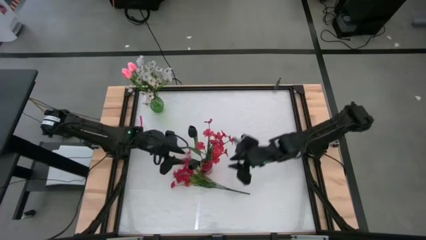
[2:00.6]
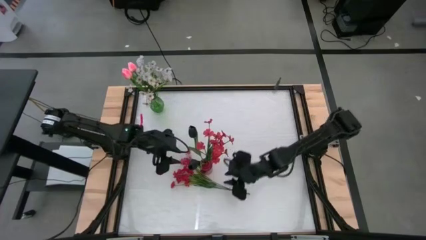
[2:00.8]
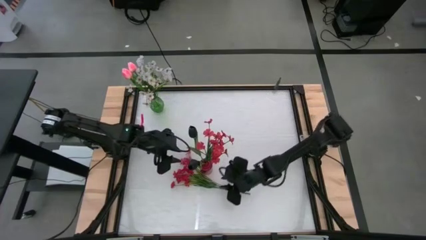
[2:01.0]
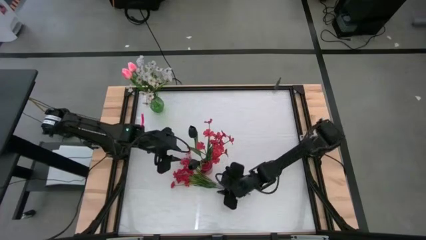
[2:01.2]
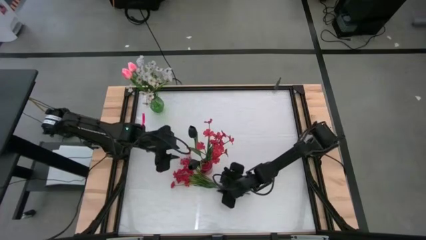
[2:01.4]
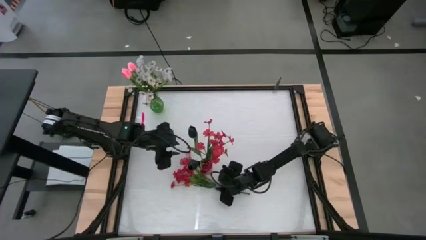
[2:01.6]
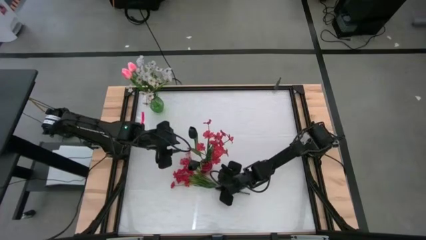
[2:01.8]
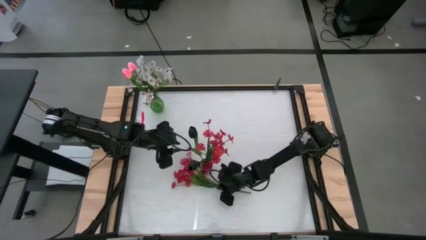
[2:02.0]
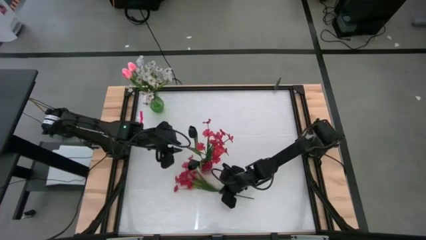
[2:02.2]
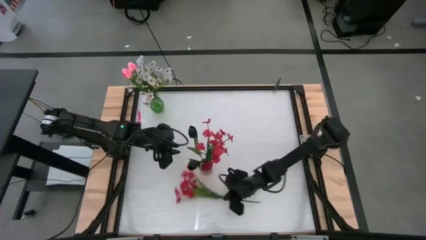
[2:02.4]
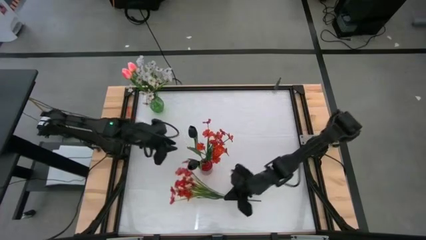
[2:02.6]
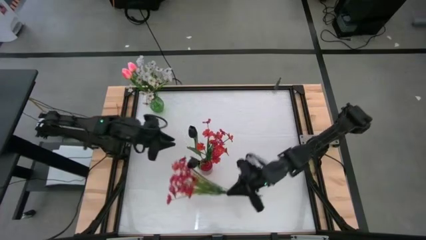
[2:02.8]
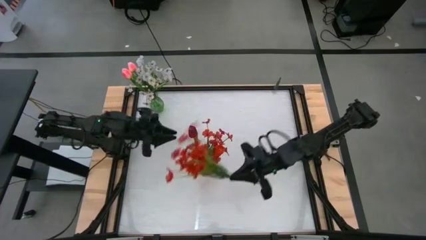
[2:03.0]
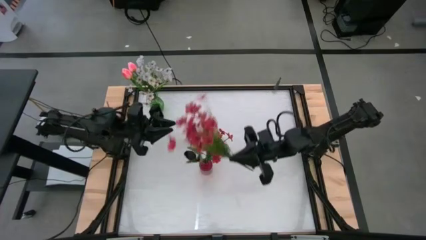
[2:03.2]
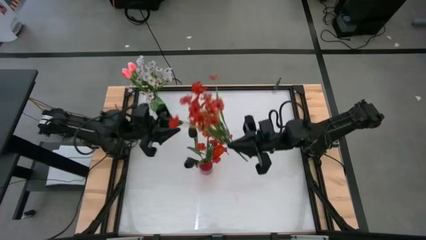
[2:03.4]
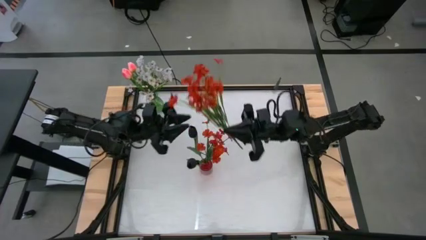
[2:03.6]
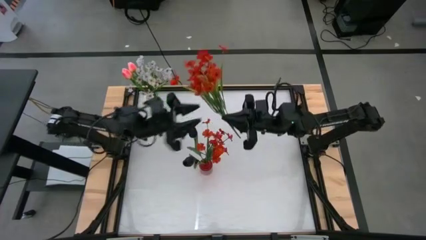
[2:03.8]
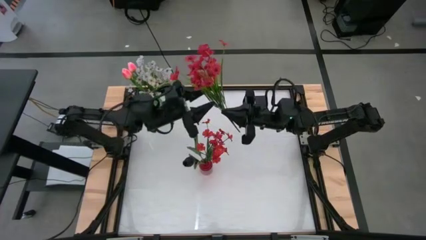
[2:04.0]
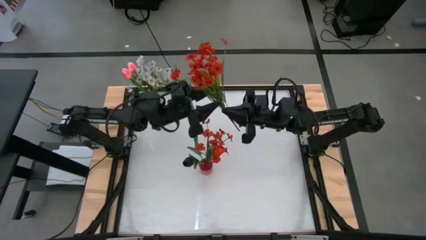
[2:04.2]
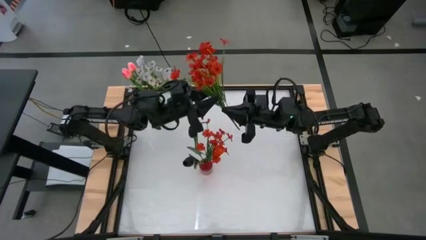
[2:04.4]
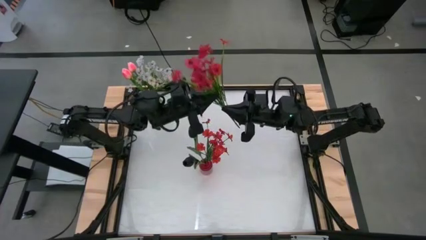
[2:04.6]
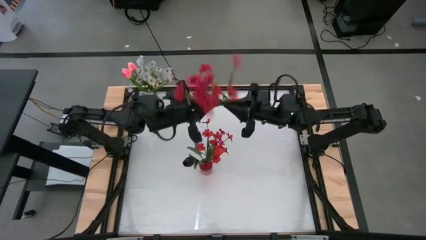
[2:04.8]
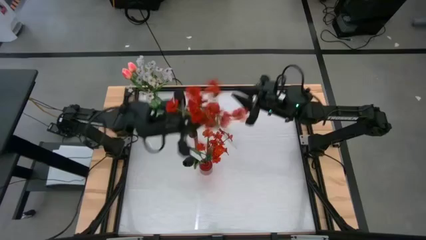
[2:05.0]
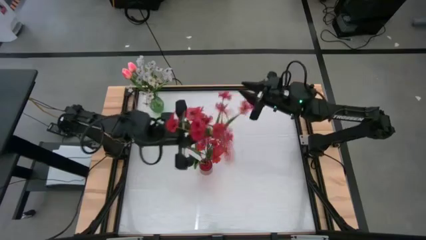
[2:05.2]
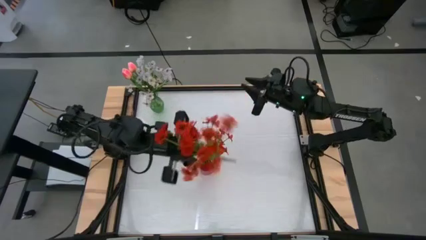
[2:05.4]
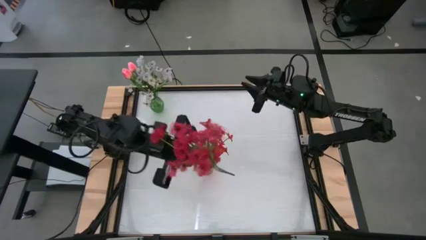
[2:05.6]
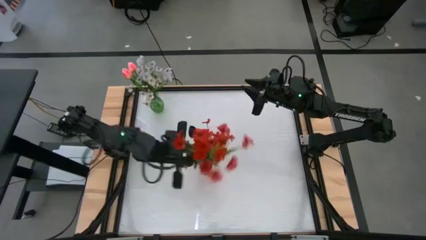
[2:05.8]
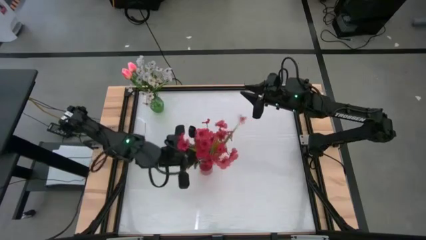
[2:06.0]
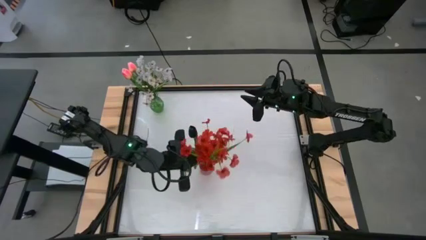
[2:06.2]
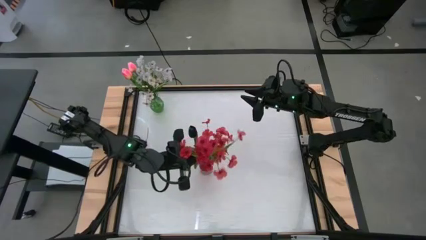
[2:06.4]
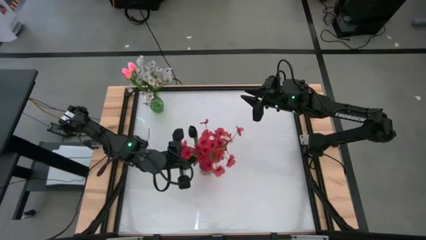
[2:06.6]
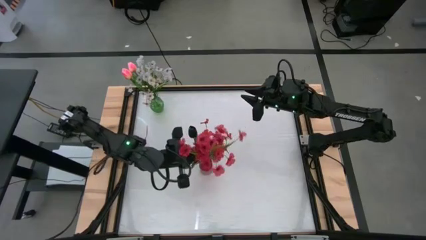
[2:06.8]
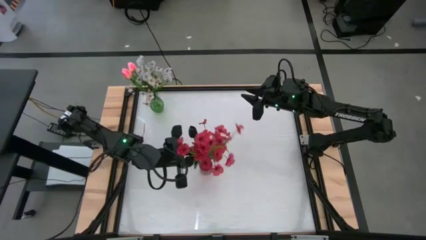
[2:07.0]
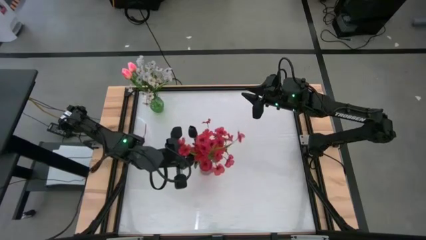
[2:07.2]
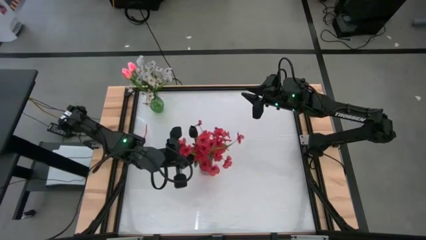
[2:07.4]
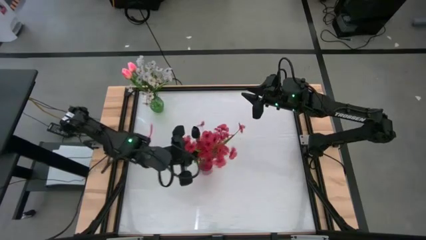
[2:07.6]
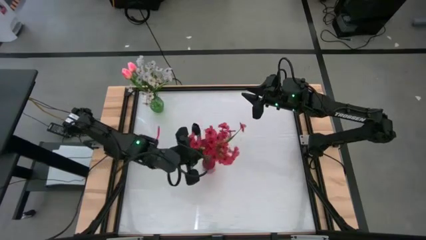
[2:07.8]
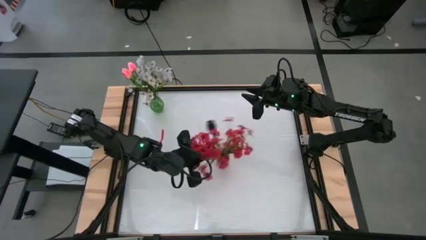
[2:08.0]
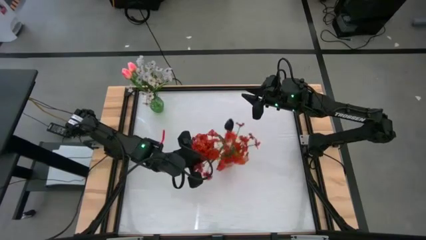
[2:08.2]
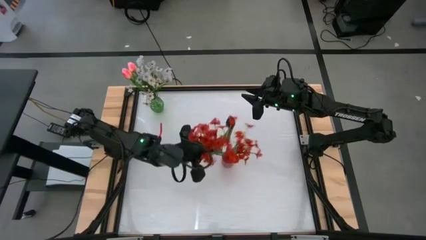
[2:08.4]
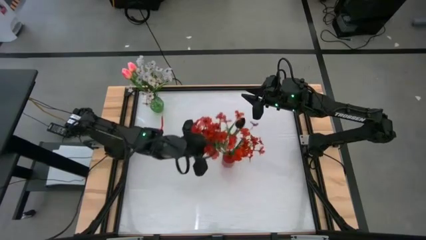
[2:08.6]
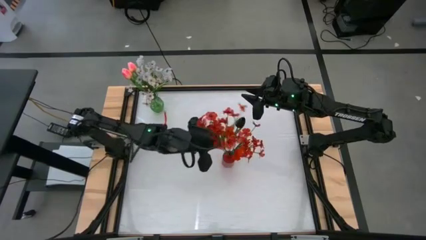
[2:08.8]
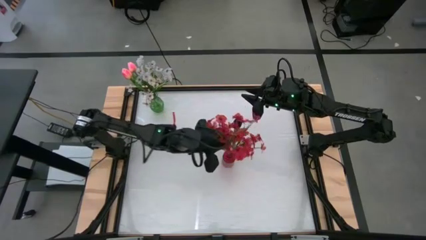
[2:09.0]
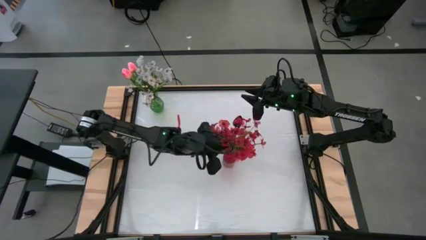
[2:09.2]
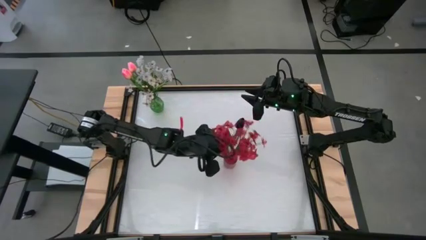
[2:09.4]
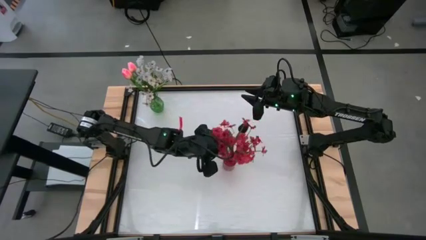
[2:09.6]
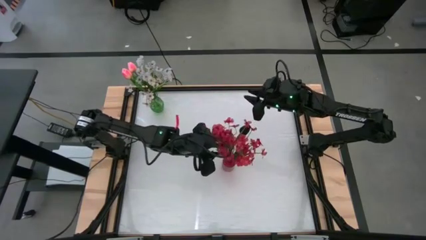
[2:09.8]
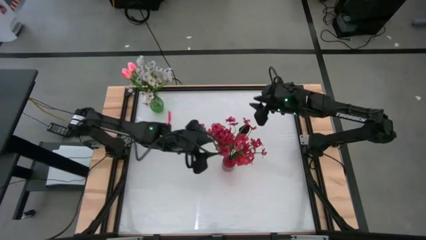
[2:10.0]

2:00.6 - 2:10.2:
Task: Sort flowers into vase by color
Put the red flowers into the red flower vase

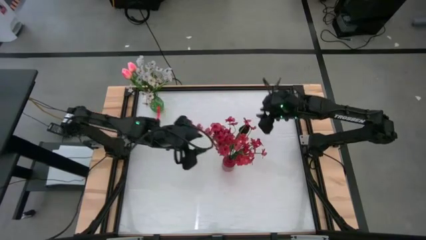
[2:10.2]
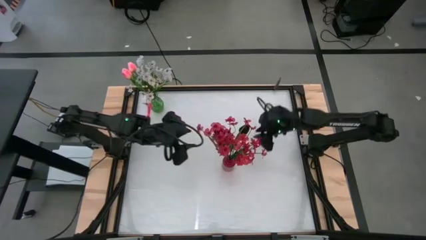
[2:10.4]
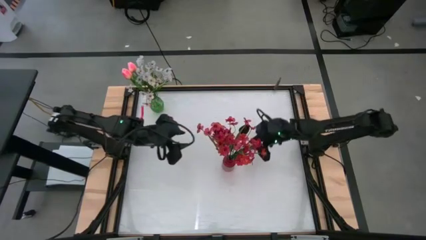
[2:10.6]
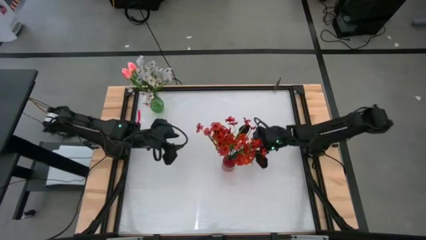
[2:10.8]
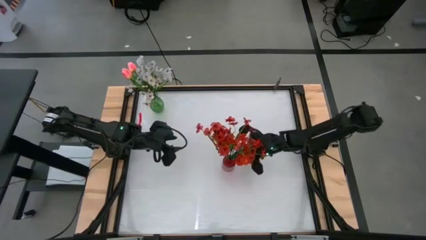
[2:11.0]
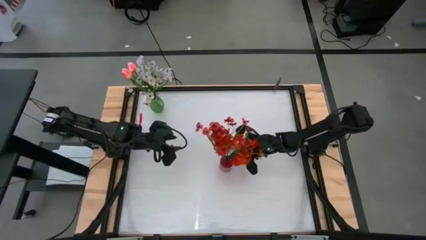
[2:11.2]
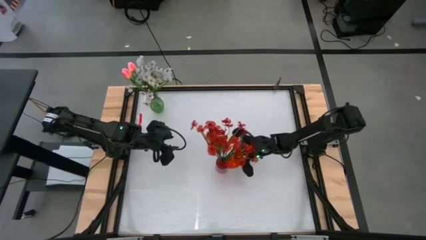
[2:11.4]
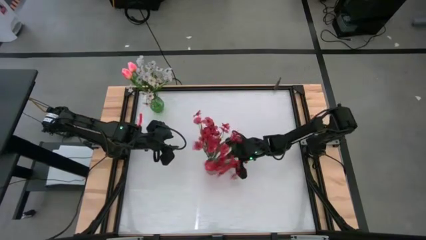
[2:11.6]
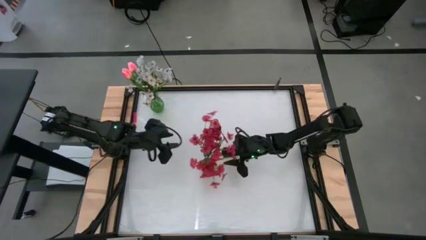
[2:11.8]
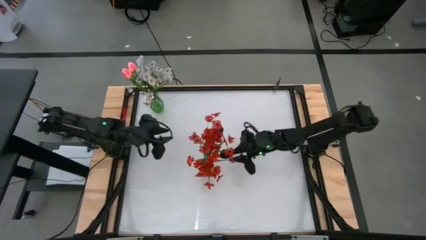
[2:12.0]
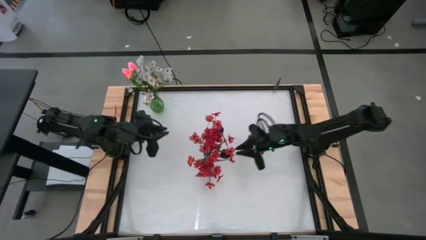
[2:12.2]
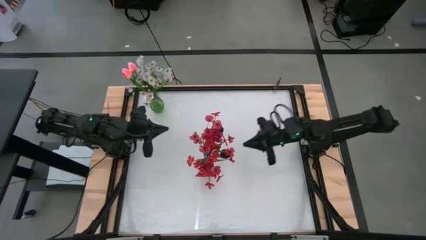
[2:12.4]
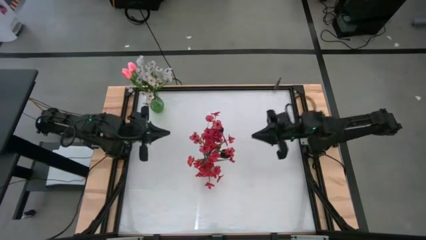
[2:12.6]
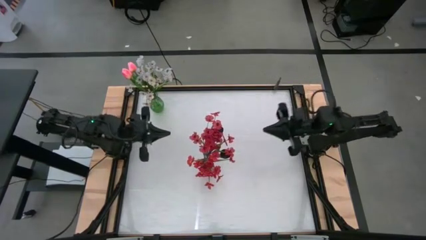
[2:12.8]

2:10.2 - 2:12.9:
Adjust the red flower vase

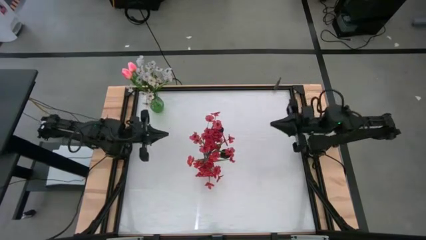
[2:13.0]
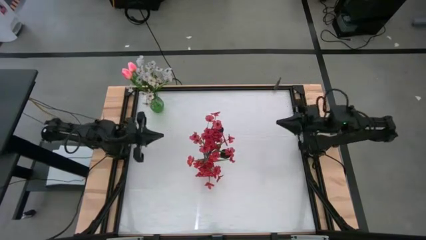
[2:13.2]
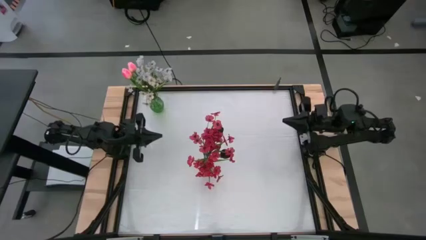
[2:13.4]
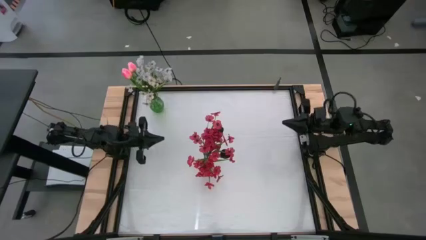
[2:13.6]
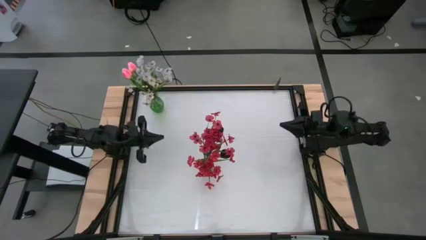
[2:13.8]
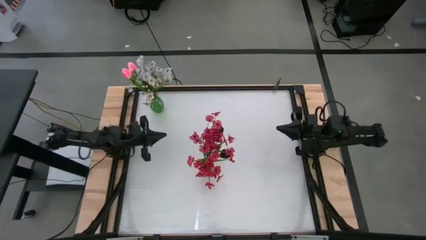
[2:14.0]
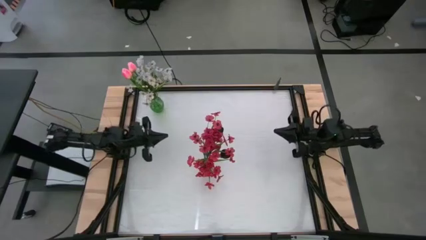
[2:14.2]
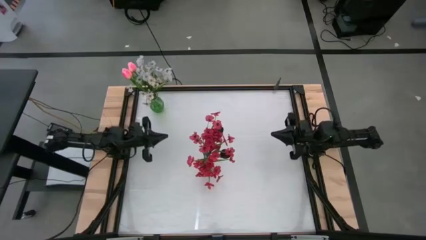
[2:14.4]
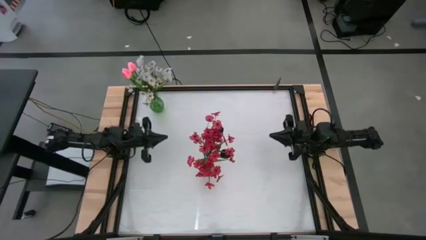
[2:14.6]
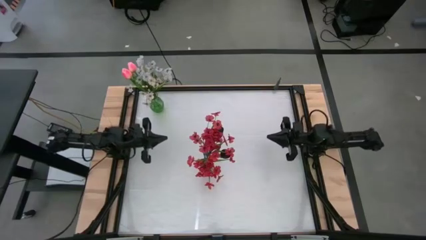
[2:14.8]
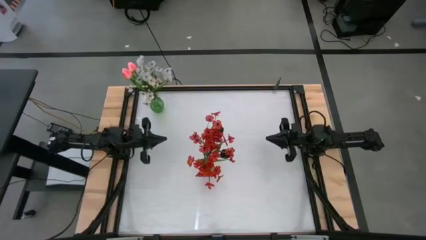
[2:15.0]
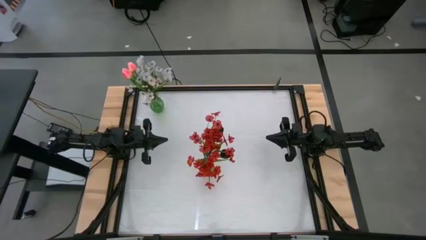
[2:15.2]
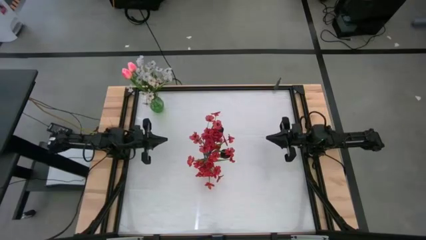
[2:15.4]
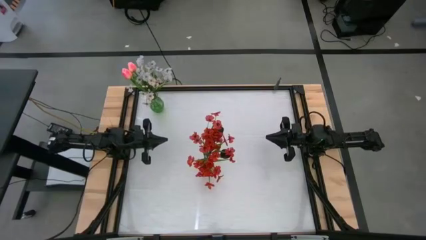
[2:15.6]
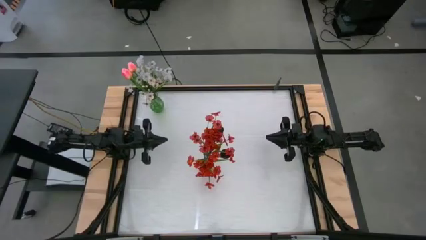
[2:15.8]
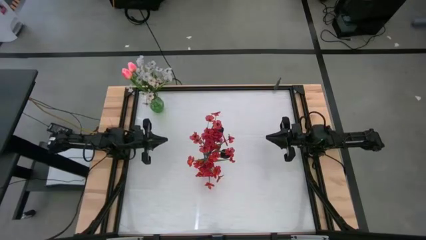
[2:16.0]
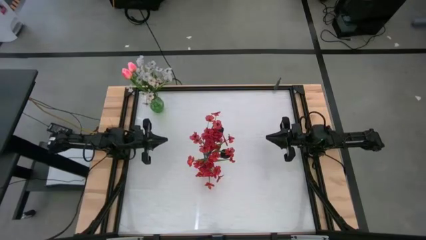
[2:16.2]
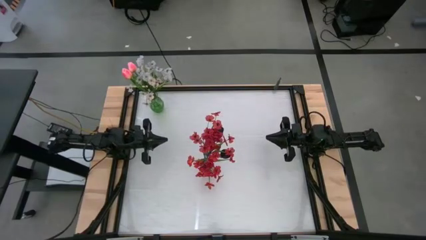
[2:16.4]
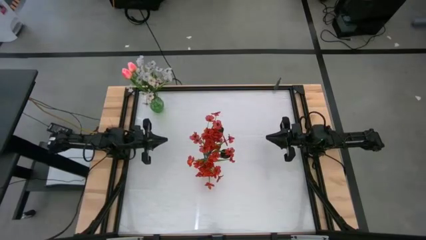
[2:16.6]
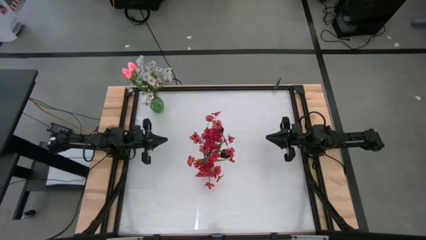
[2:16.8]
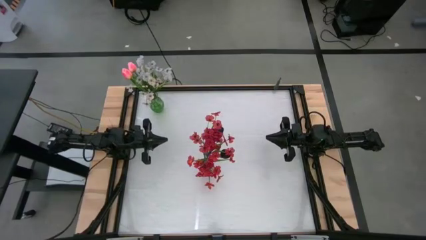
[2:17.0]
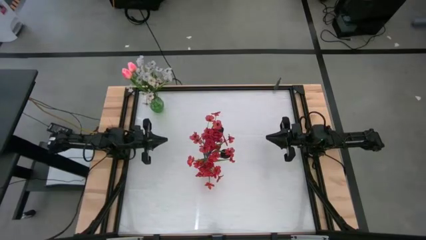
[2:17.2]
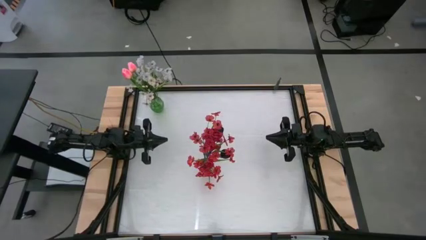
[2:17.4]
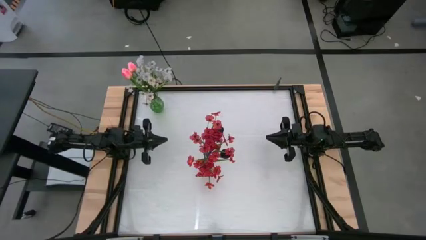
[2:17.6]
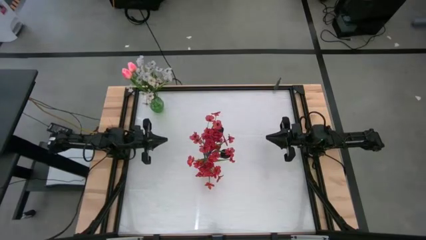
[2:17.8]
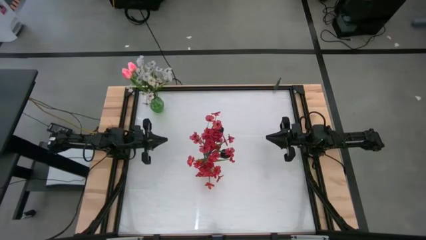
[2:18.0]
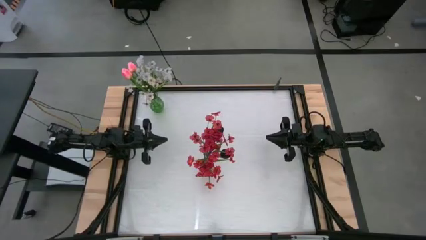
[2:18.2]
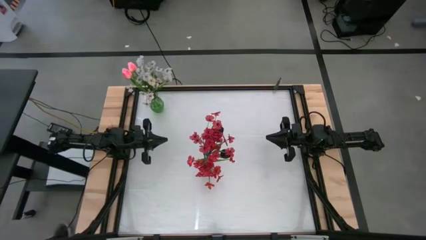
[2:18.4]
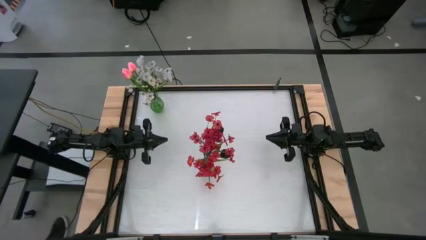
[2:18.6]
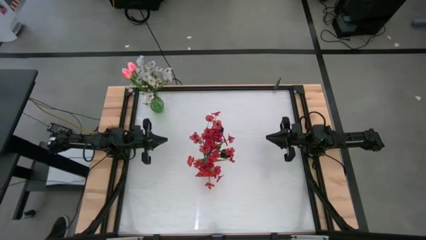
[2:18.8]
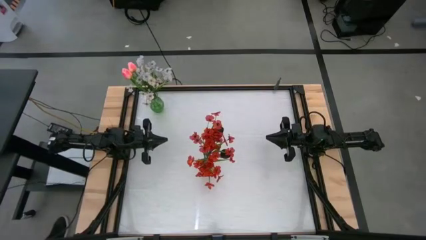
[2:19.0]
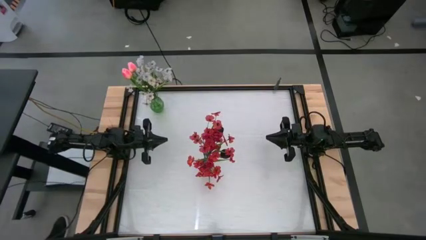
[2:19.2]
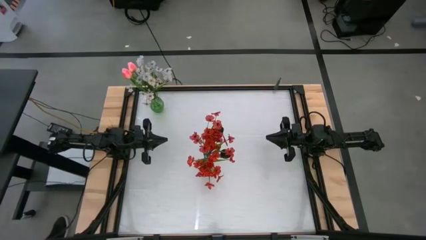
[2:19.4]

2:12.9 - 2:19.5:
Return to Home Position
